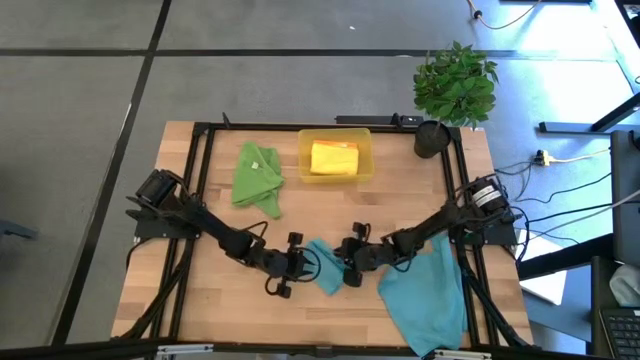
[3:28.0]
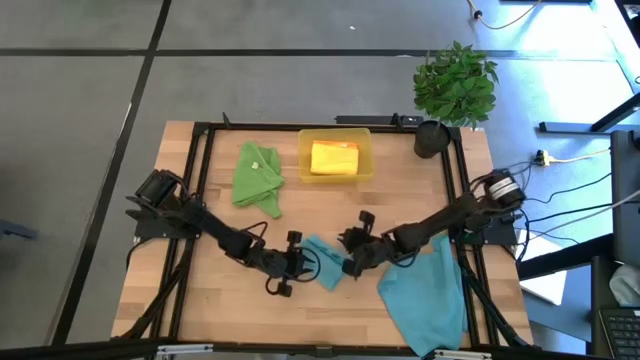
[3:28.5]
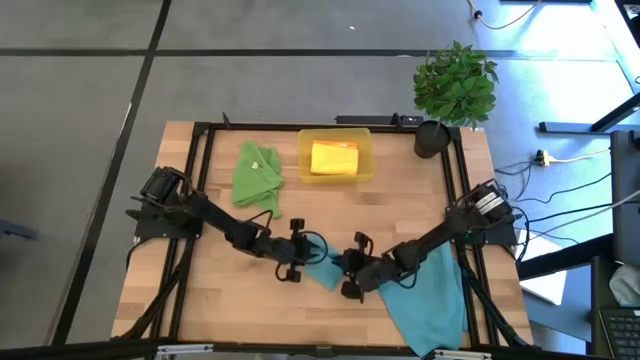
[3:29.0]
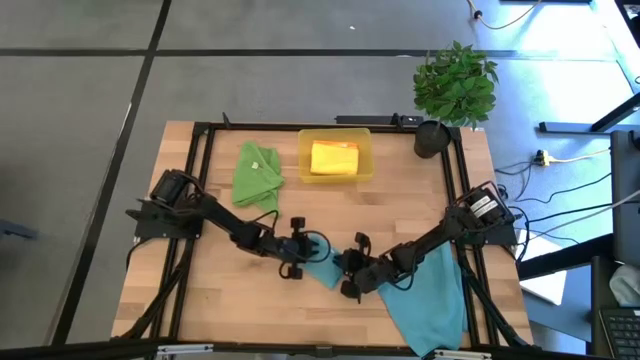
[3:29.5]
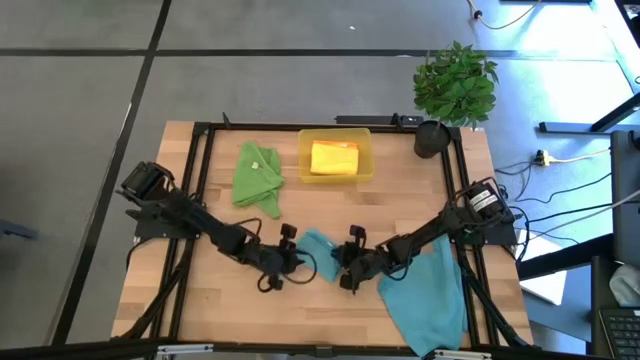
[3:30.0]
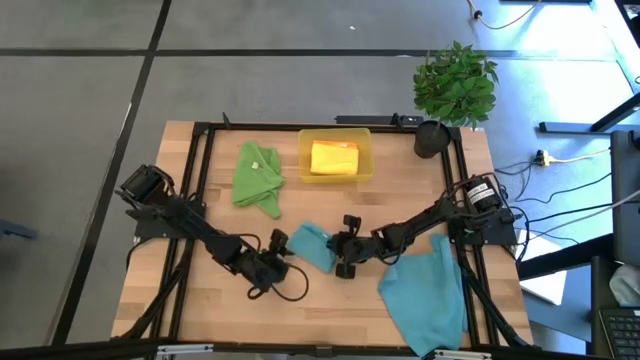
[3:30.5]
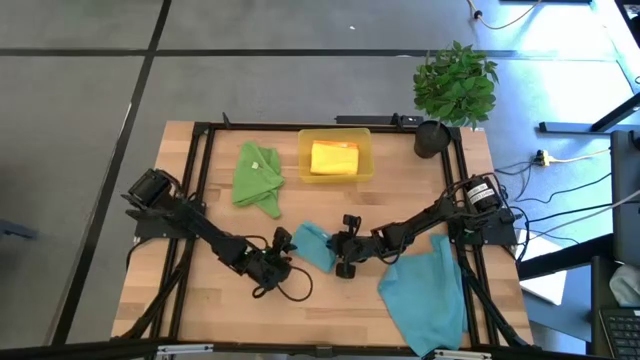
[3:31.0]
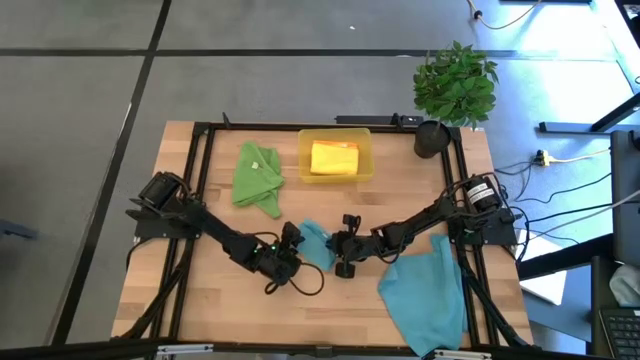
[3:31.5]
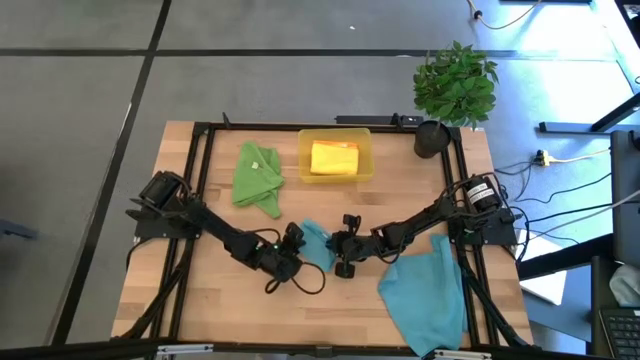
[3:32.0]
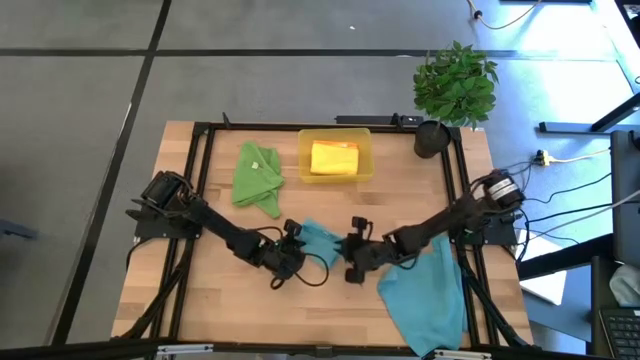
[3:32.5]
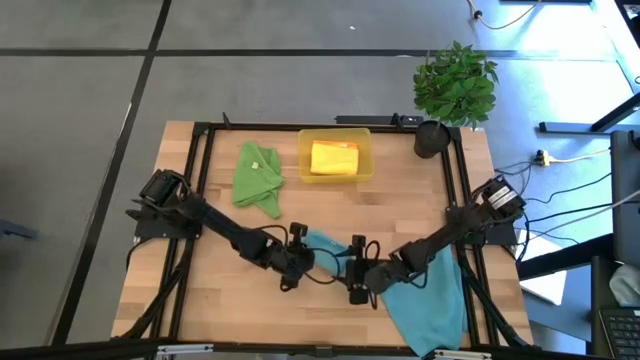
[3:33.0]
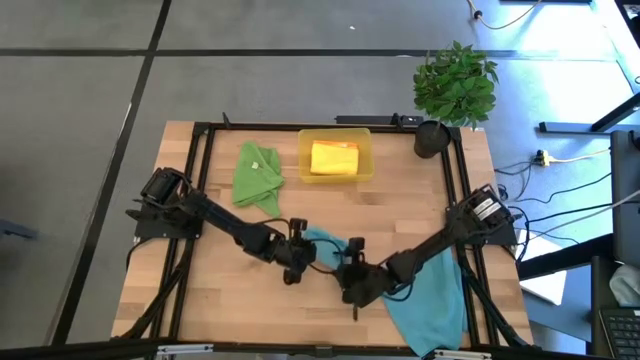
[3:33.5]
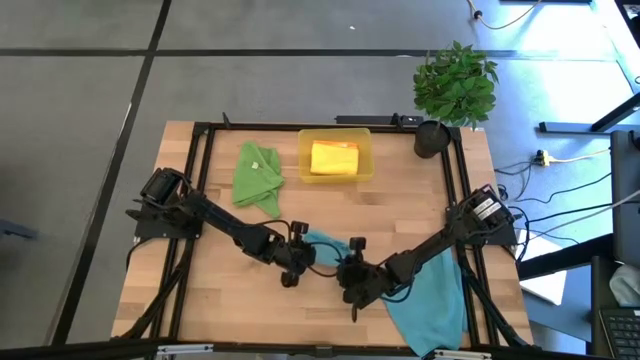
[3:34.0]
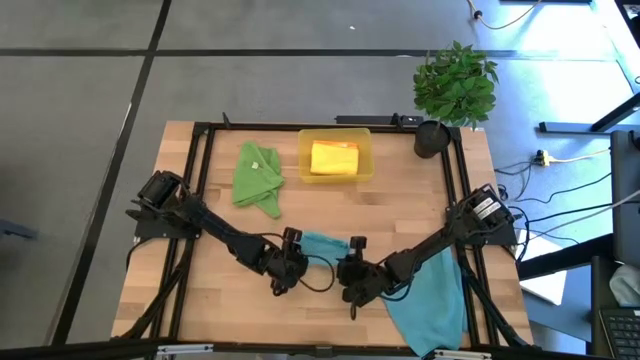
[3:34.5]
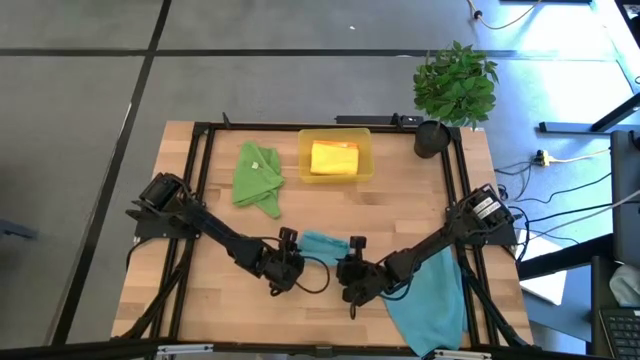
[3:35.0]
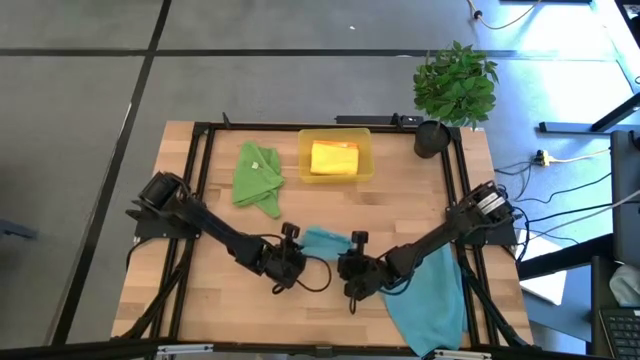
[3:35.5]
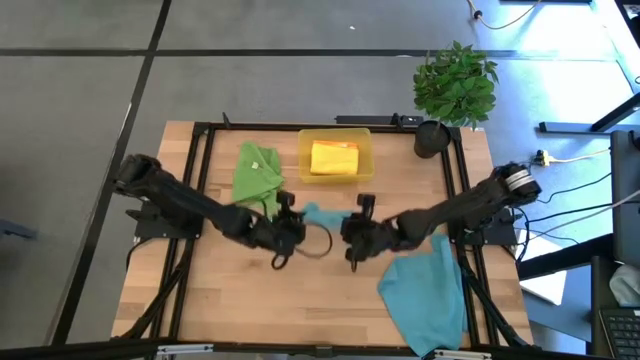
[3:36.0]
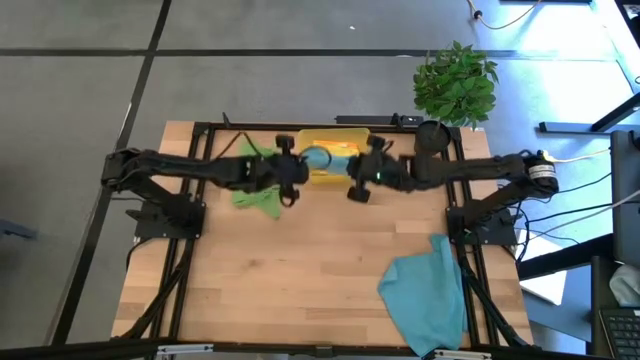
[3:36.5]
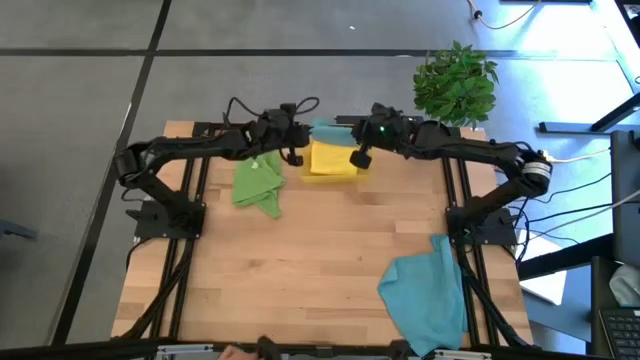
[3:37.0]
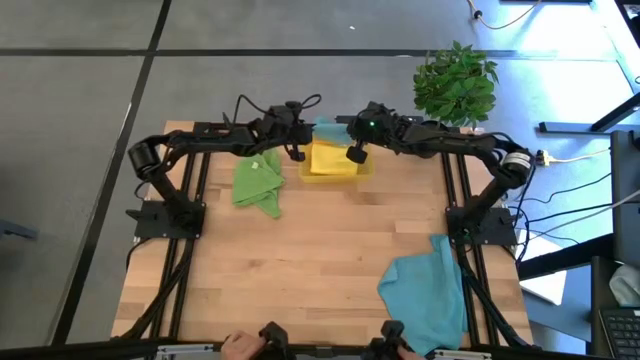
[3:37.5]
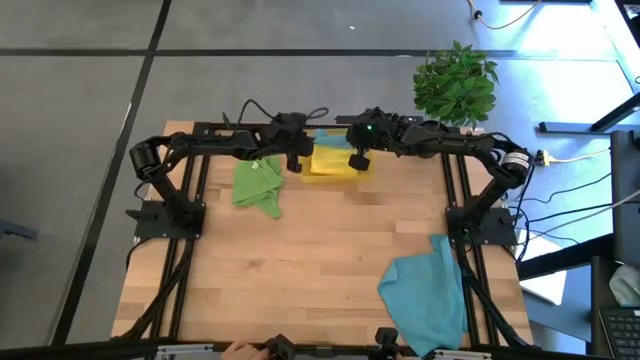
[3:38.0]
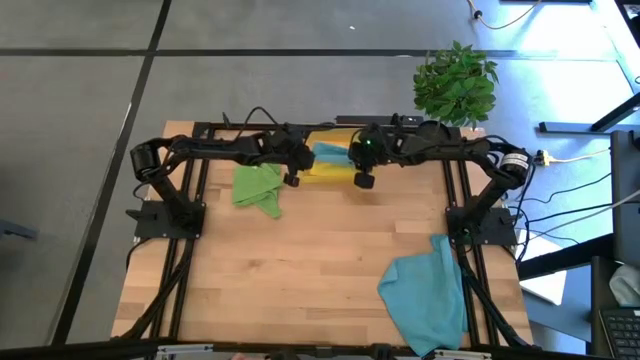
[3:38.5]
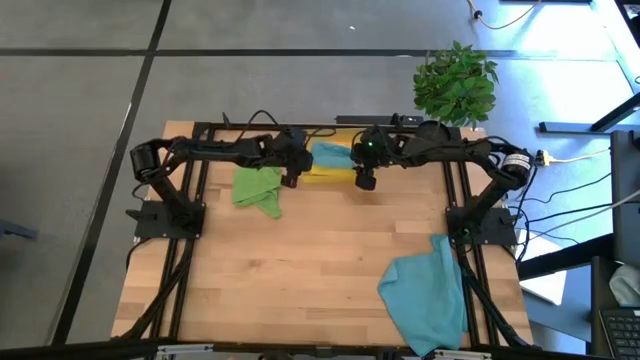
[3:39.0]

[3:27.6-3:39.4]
Task: Fold microfiber towels
Put the folded blue microfiber cloth into the yellow bin

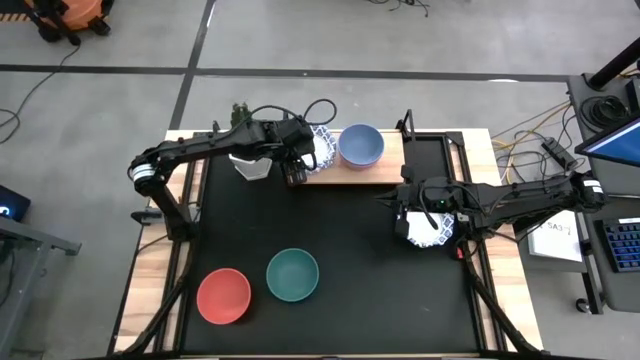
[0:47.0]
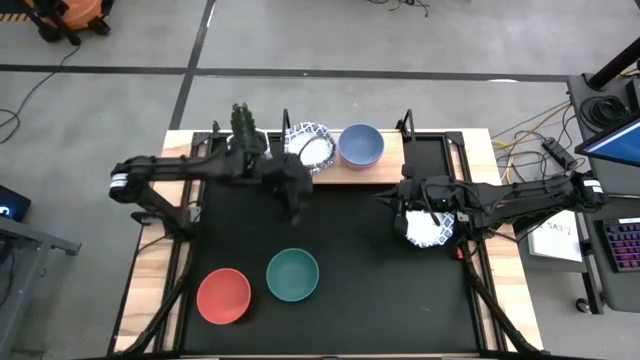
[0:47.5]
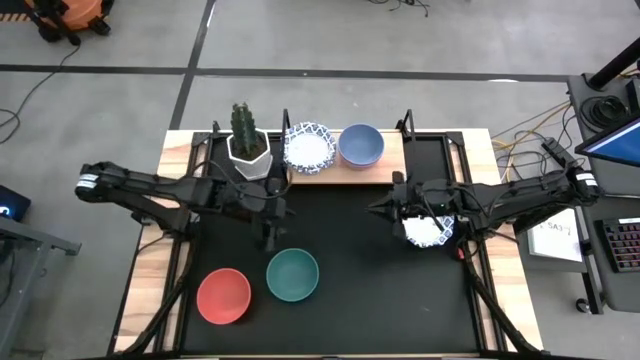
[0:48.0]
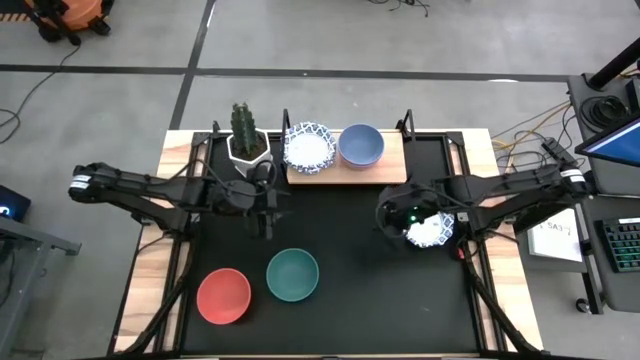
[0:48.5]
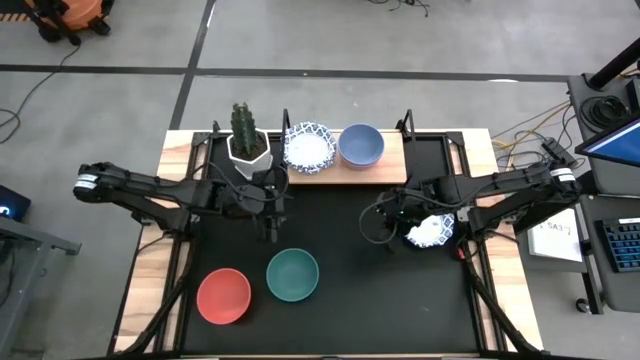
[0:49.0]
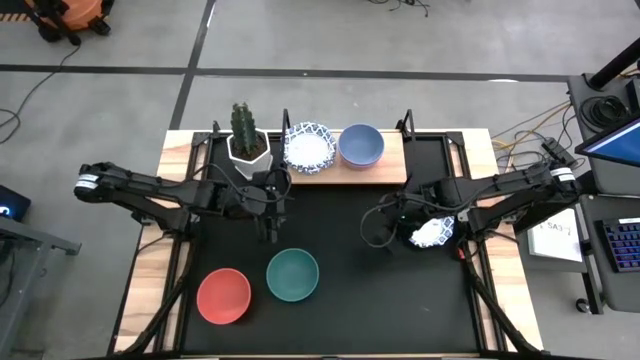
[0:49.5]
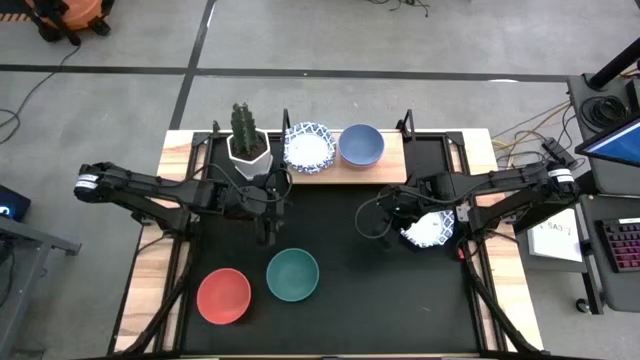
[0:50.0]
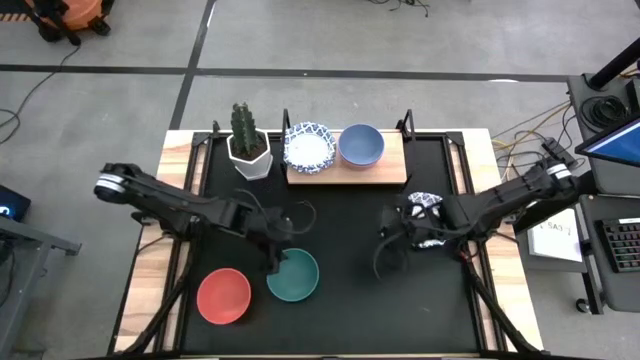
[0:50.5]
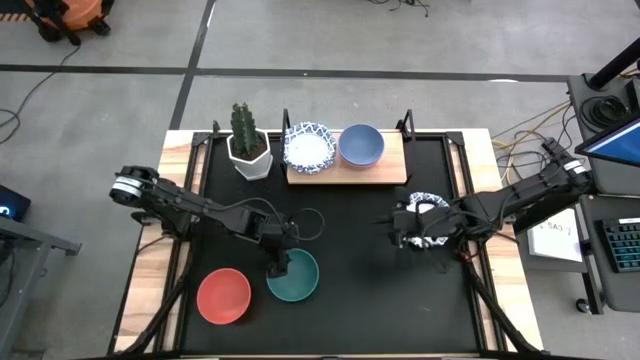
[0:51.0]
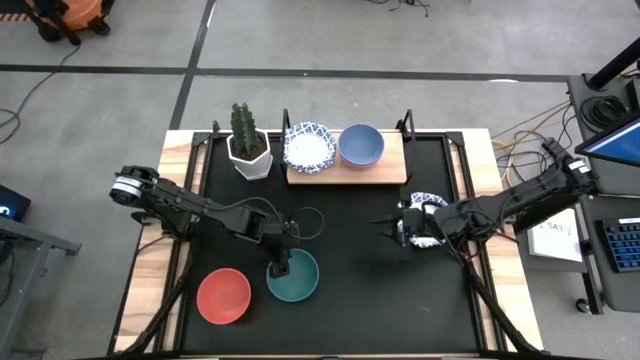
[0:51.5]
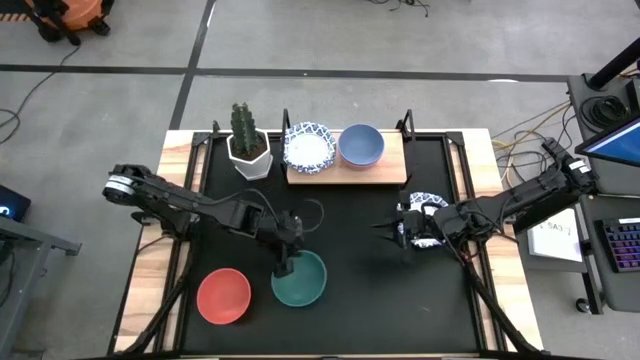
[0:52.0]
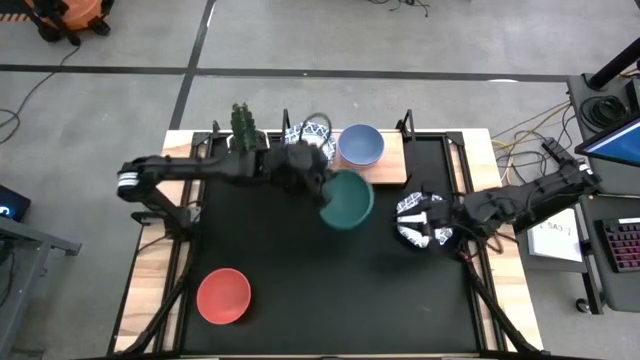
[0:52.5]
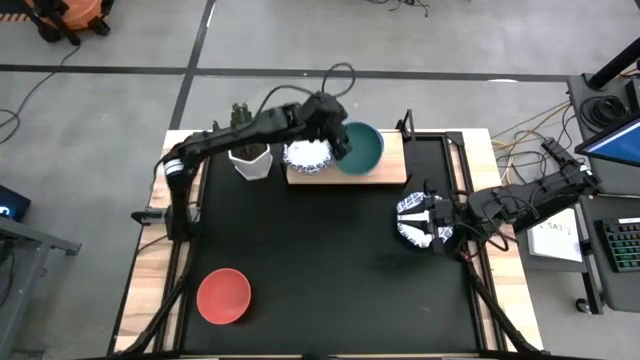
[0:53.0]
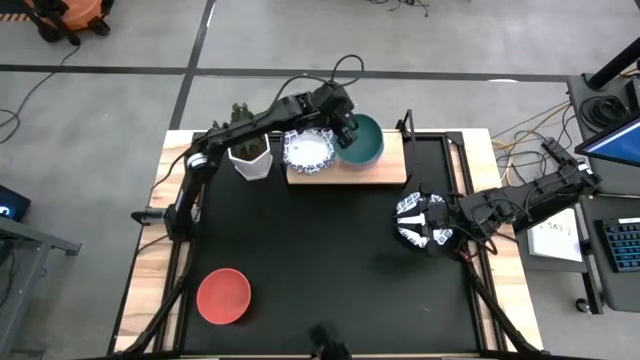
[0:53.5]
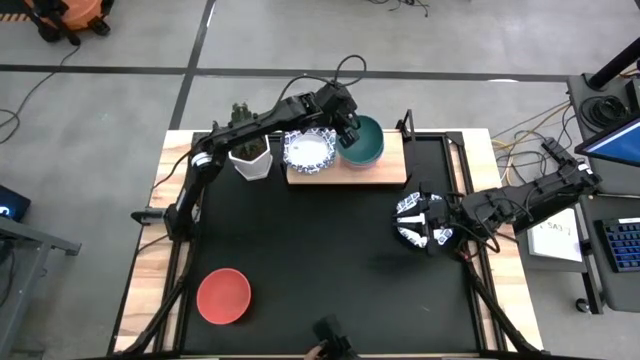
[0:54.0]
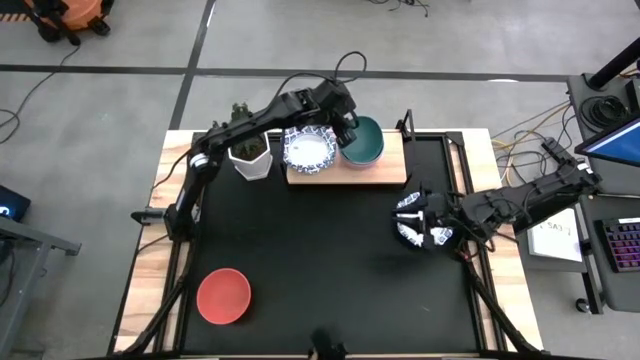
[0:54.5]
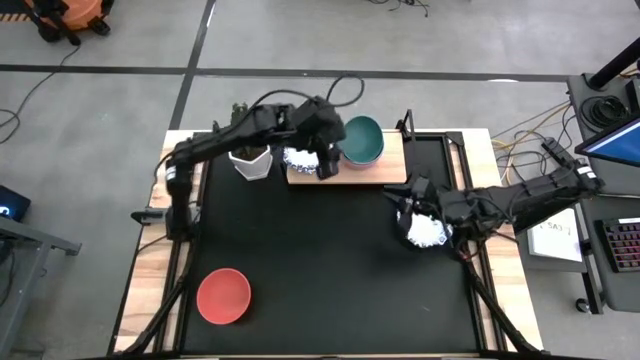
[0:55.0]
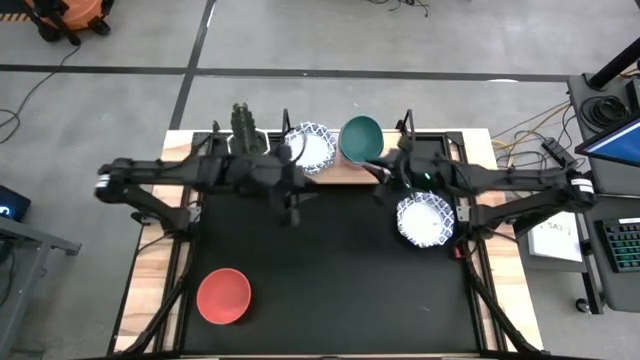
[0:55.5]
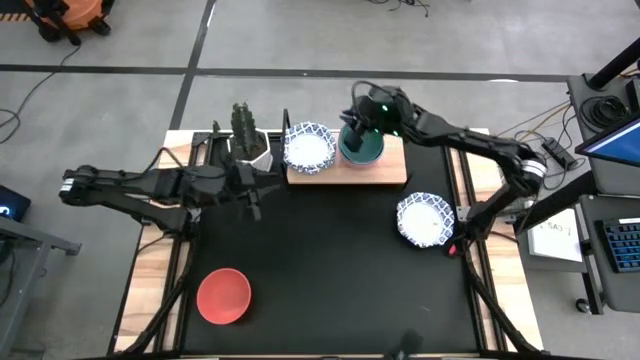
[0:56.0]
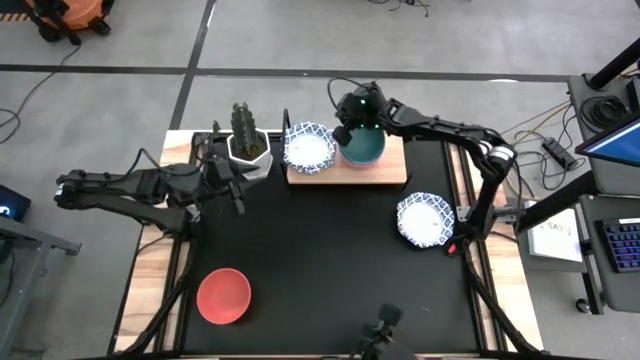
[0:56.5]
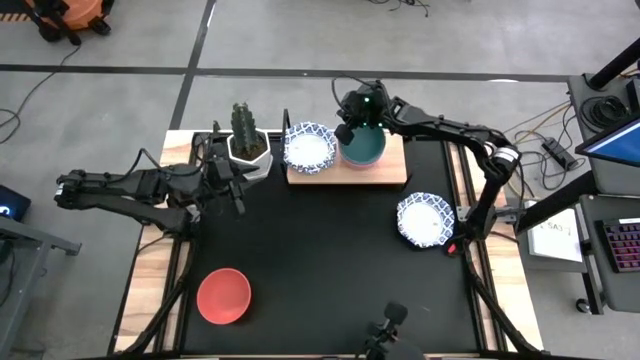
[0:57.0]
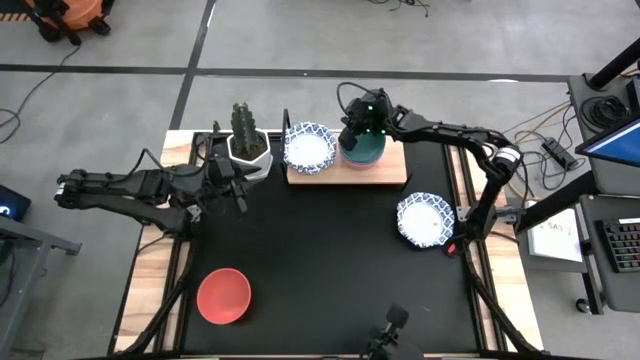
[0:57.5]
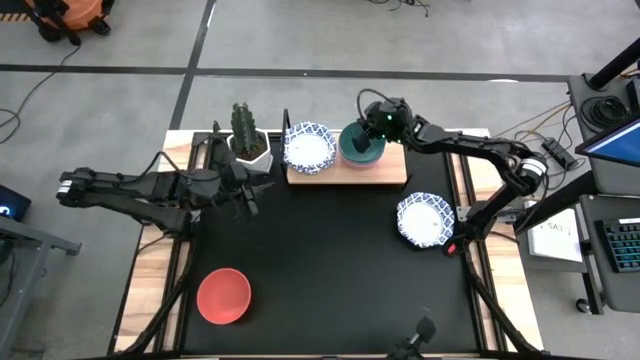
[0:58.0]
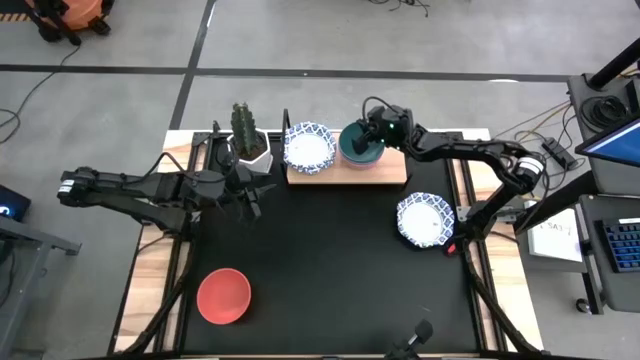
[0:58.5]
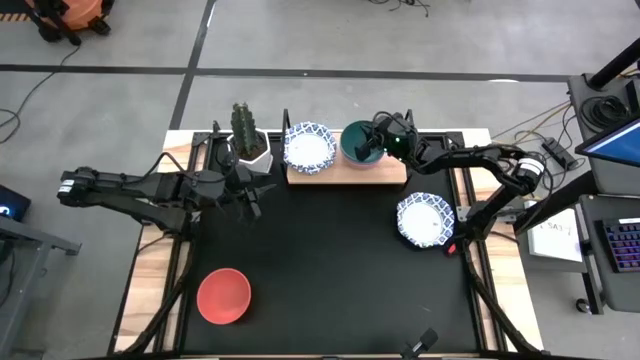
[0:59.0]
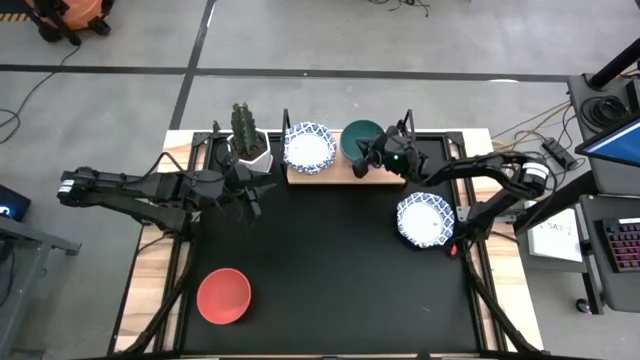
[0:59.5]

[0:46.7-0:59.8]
Task: Place and stack bowls onto a shelf
Stack the green bowl on top of the blue bowl on the shelf
